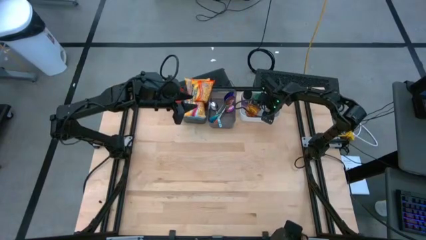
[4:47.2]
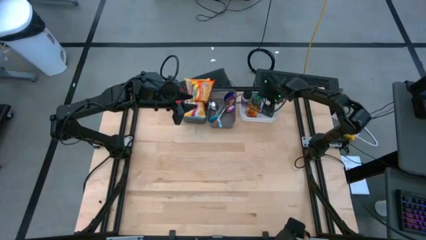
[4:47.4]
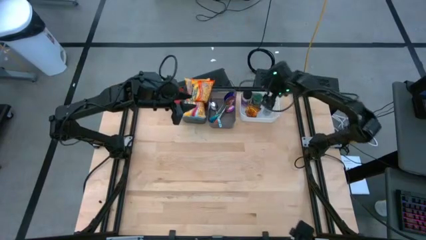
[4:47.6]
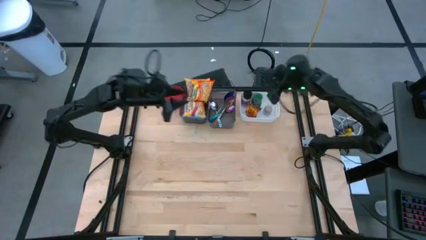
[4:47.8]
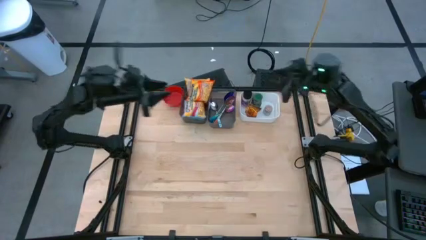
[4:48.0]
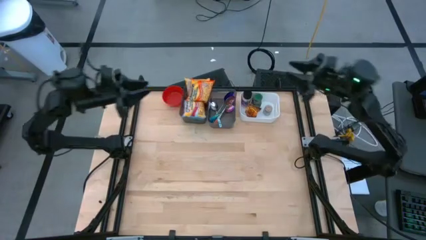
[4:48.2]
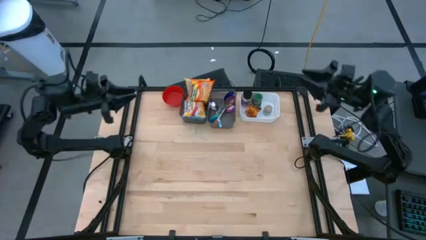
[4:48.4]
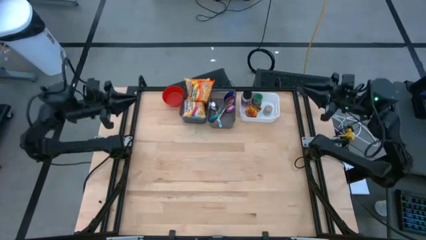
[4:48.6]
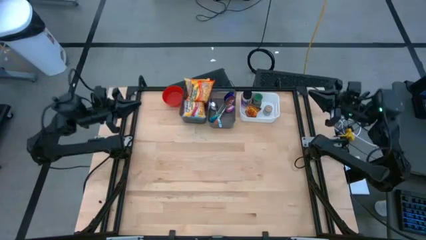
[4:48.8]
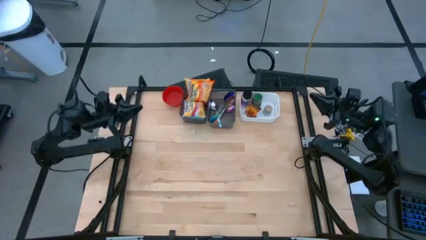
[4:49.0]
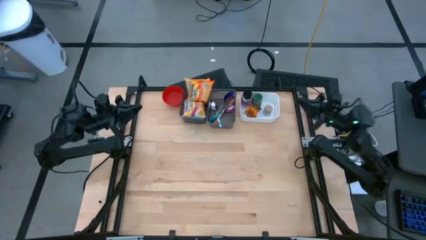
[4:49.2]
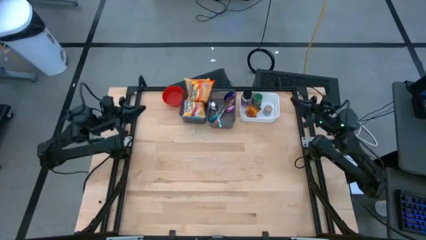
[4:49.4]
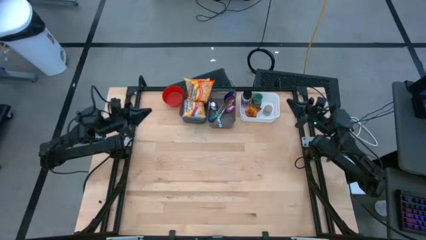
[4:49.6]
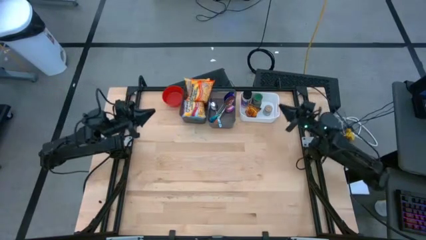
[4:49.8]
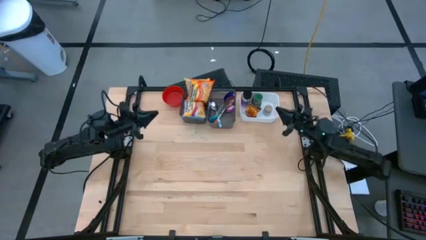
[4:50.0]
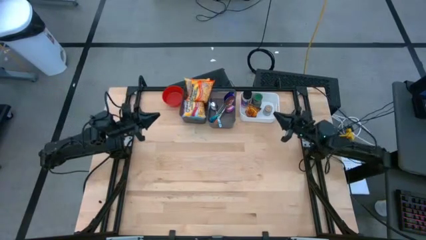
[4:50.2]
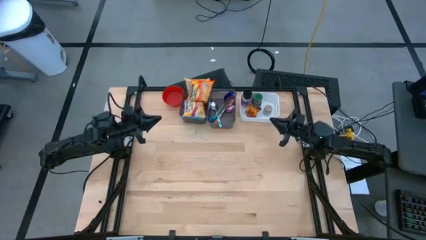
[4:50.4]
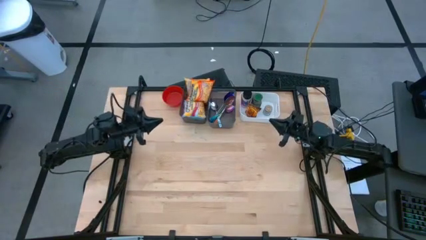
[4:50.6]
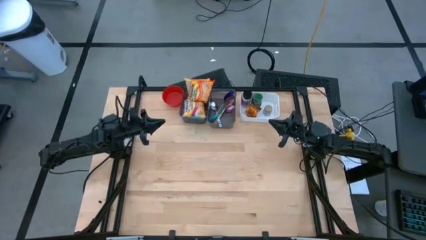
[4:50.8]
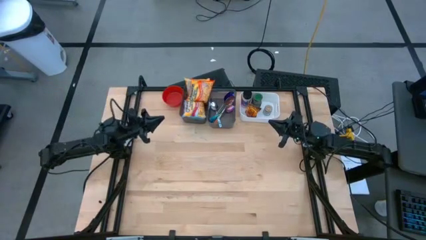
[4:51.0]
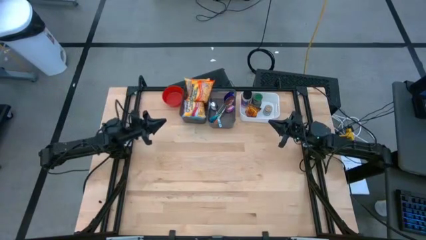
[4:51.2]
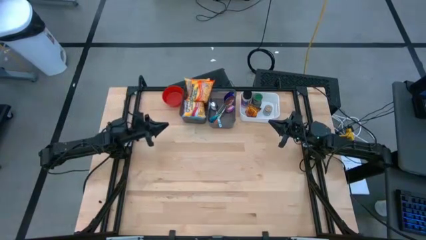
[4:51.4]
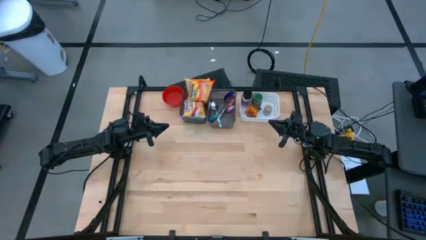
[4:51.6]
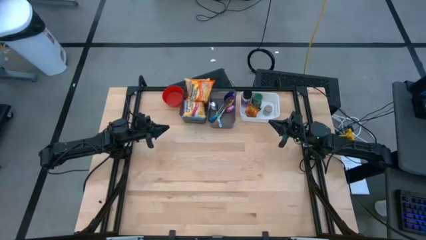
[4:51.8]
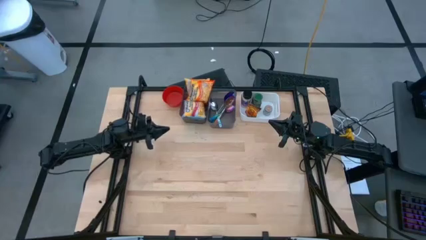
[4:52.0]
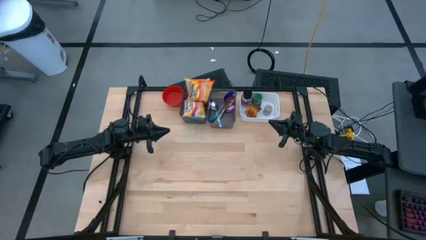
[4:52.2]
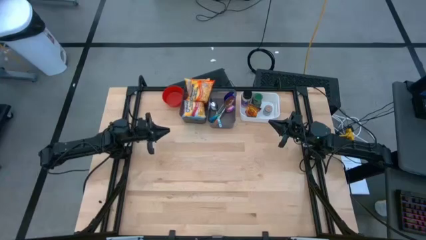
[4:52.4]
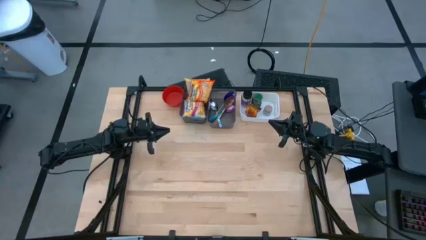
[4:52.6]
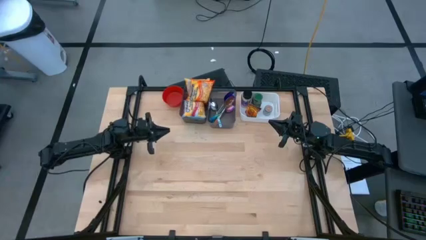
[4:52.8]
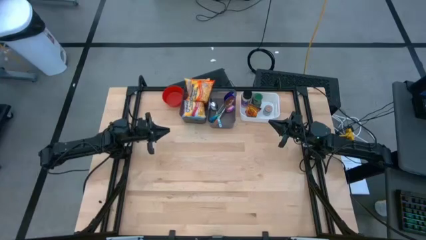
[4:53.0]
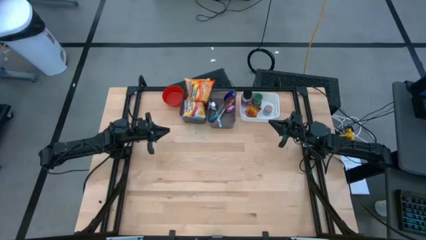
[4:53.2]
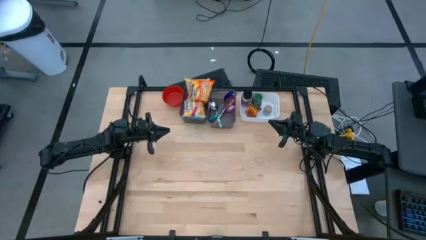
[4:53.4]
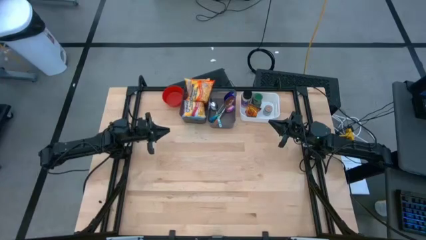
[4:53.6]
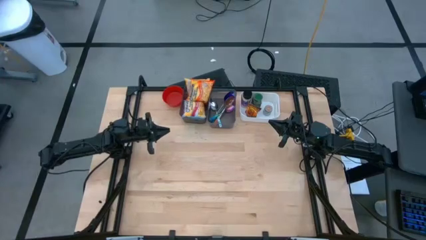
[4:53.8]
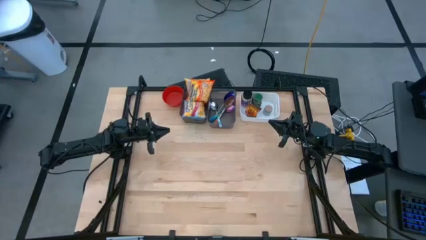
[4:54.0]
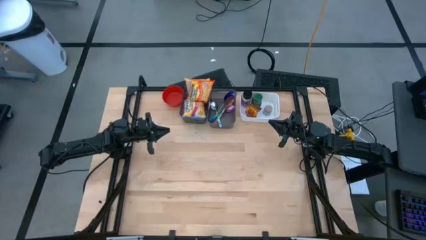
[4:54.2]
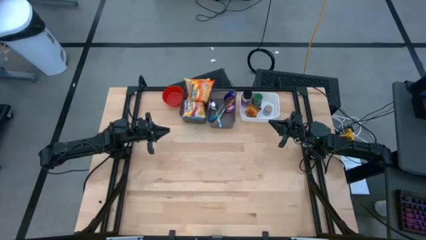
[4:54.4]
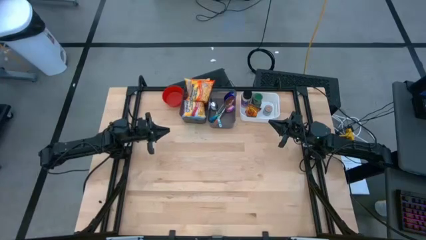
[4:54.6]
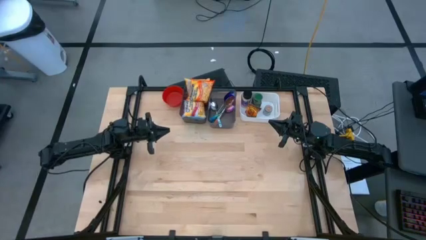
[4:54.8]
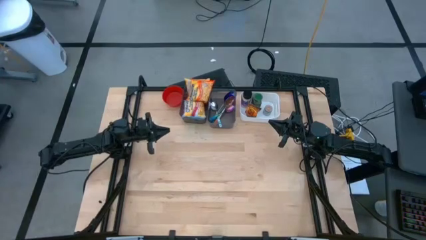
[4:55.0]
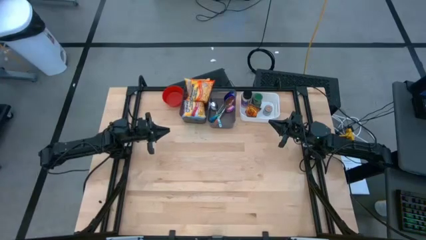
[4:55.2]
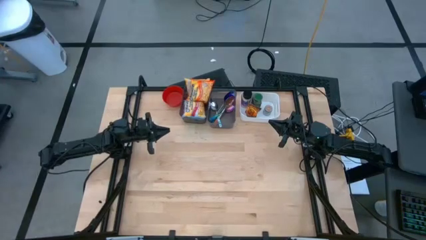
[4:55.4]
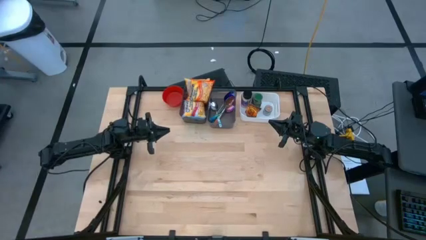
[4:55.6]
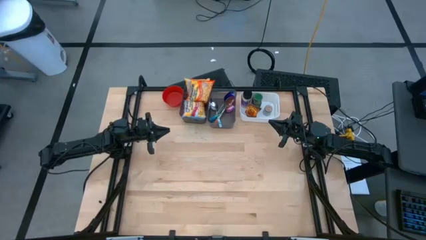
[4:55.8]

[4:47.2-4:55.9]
Task: Pick & Place Food Item
Return to Home Position

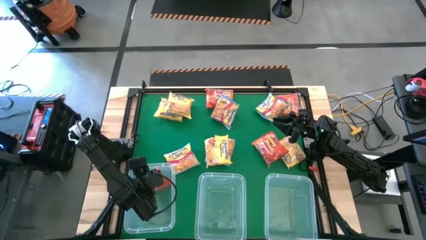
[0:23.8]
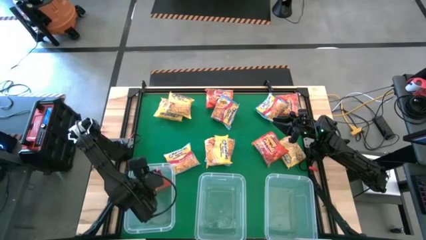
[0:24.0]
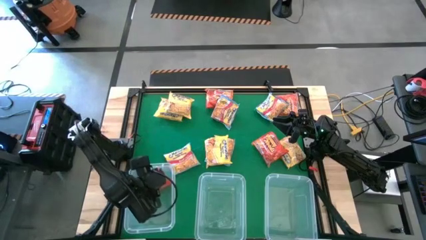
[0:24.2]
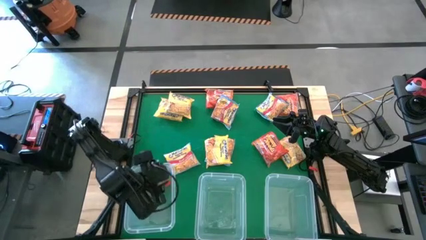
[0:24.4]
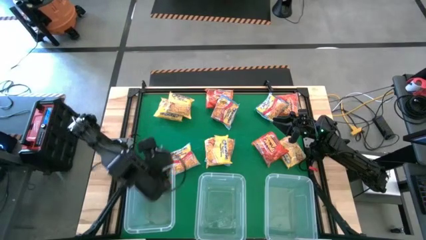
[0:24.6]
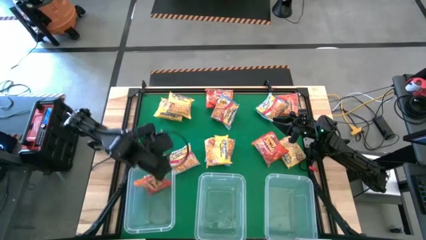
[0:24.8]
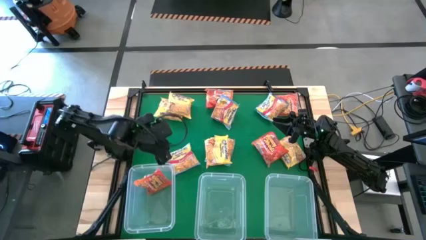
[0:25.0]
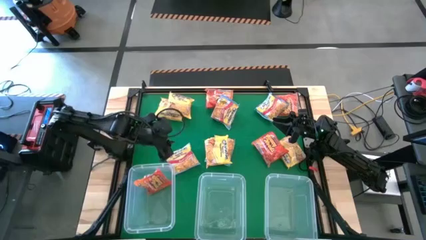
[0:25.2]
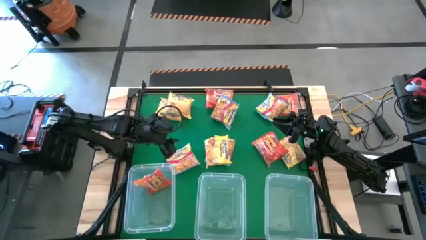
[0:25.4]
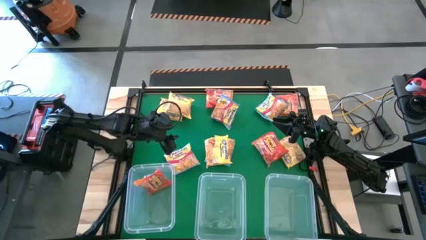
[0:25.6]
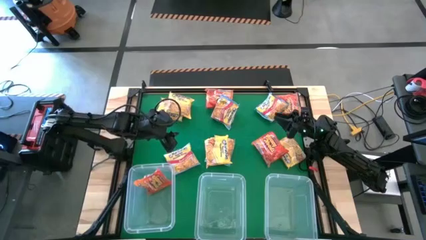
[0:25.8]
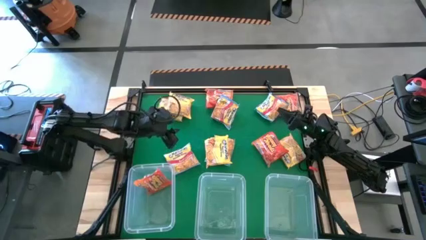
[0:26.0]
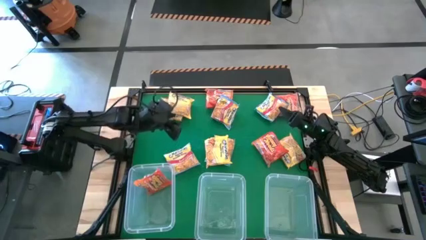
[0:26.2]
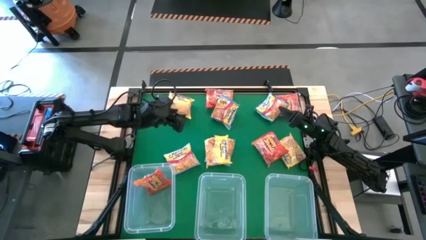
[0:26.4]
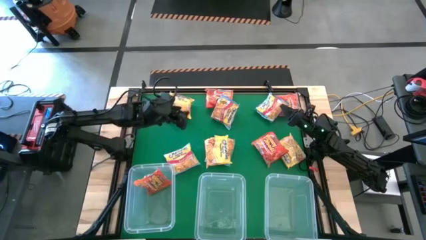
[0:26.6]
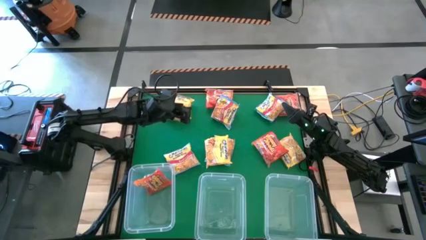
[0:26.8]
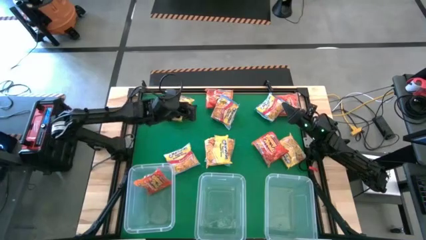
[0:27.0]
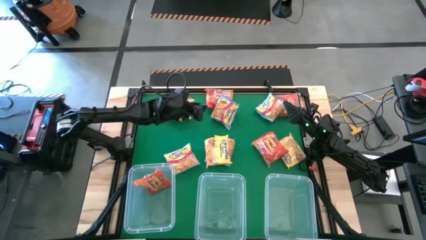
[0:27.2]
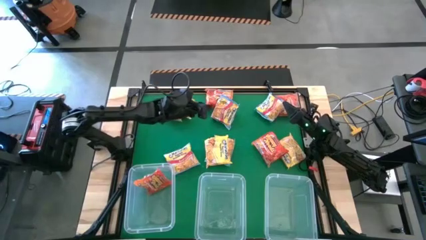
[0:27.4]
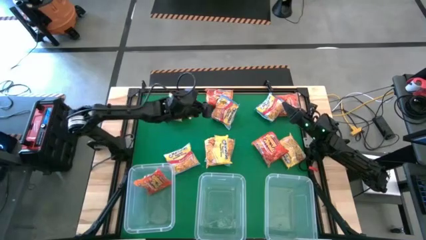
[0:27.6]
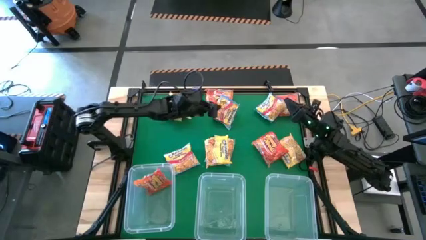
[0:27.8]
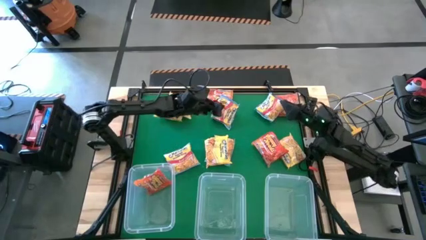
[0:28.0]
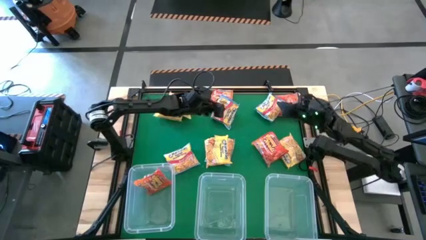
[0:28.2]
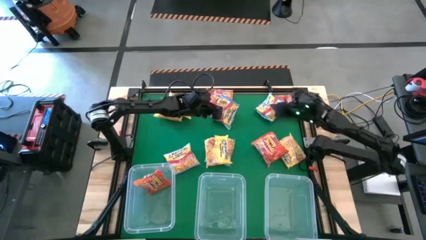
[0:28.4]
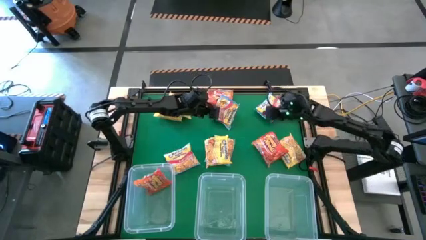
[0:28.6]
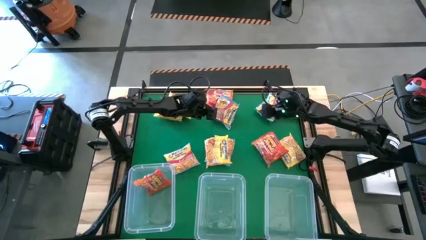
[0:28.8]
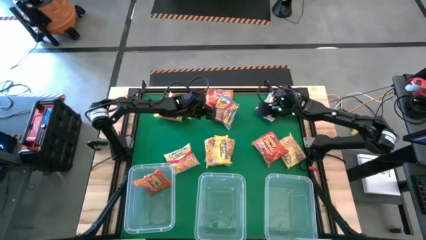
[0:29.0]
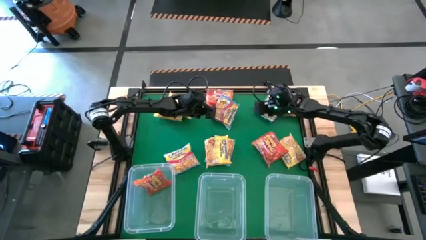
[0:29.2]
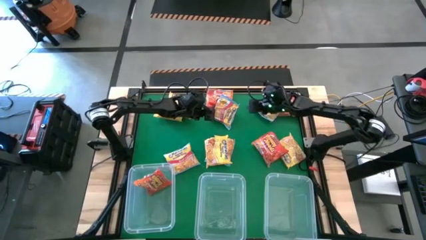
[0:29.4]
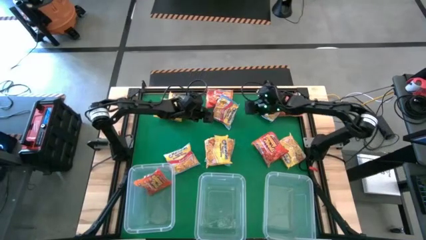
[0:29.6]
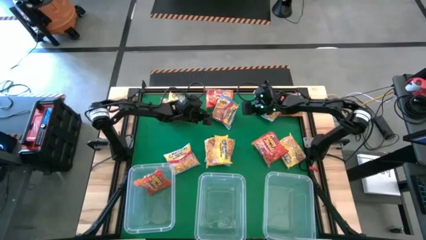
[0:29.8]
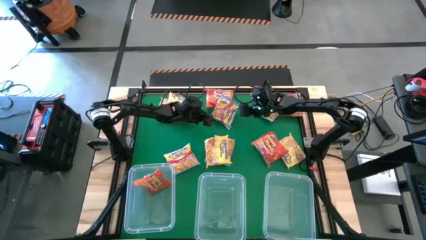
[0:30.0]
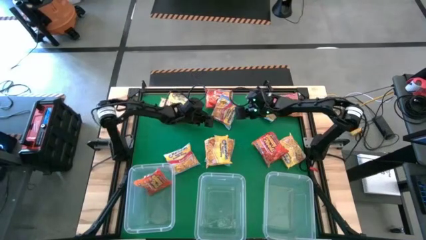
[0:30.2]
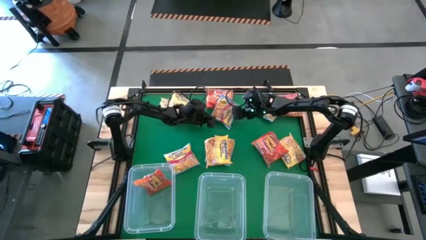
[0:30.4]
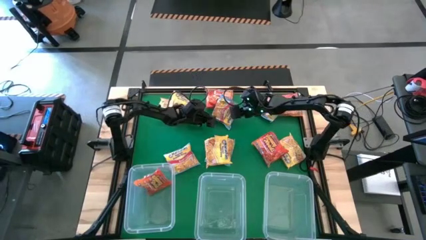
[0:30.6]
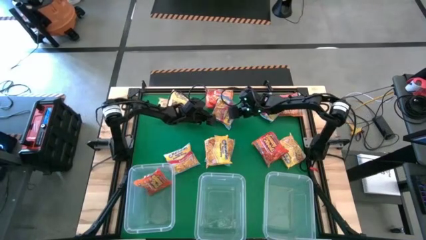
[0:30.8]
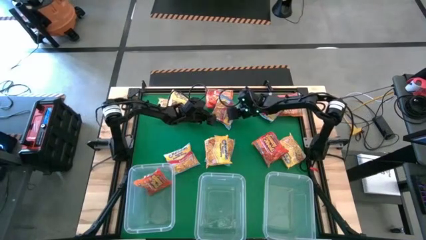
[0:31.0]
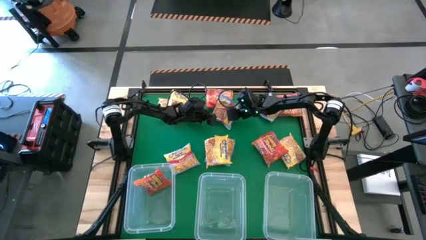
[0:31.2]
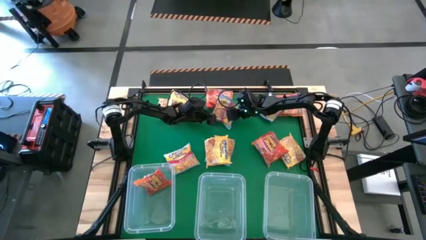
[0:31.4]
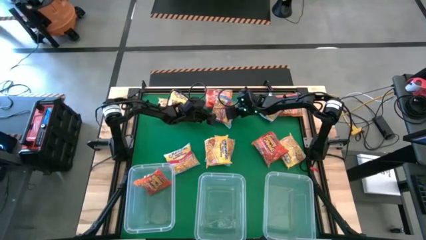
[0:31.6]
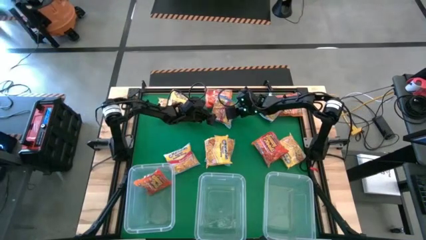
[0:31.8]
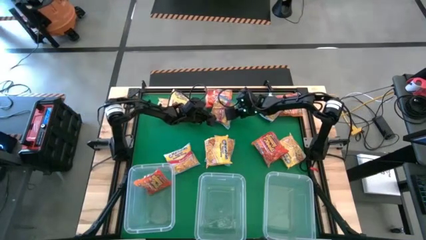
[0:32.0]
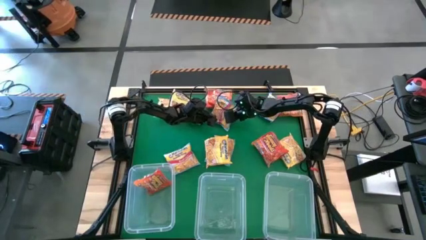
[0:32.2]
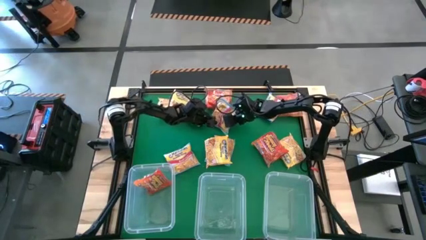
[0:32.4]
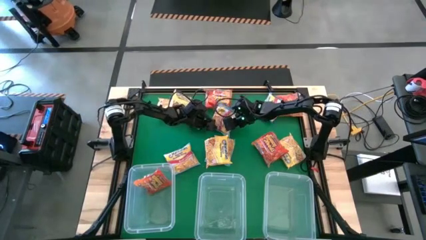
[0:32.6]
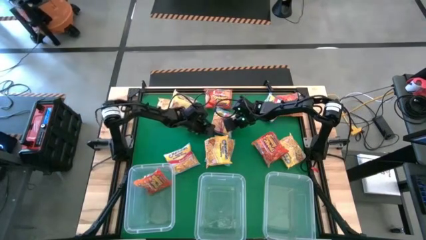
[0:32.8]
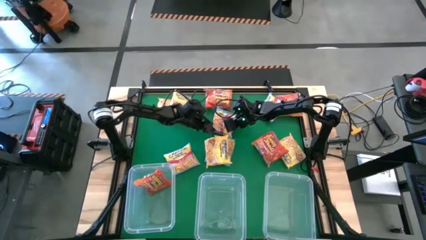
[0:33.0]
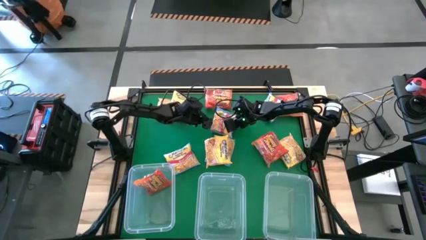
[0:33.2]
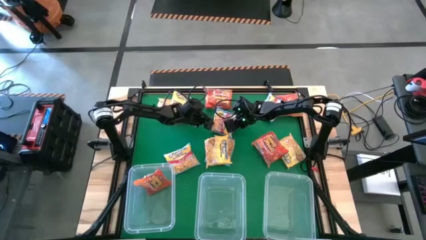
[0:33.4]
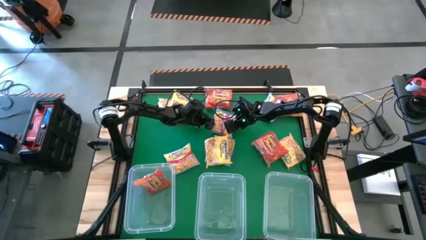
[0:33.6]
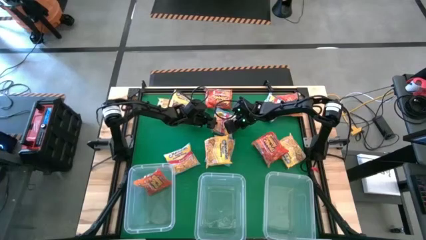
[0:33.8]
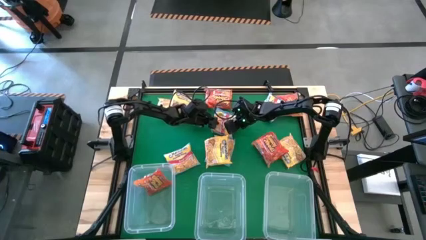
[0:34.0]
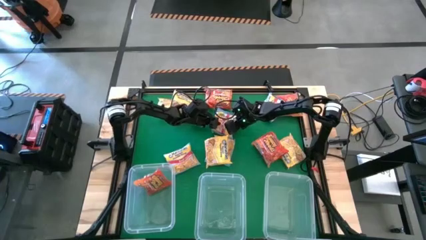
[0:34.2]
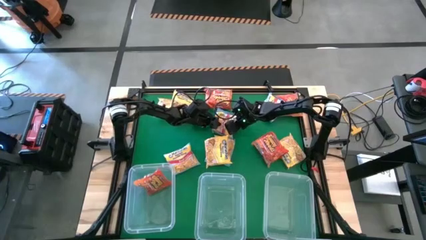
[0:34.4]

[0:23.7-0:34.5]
Task: Sort Maruchan noodles
Put the blue noodle pack into the middle transparent bin
